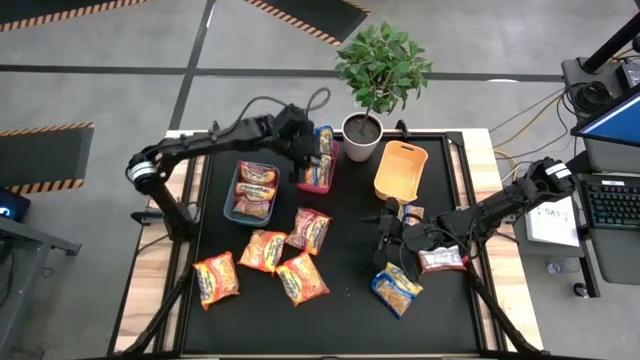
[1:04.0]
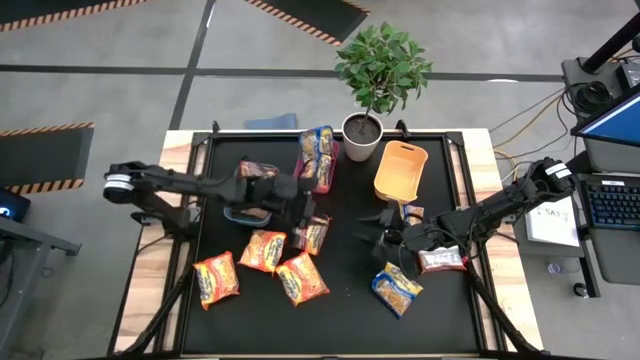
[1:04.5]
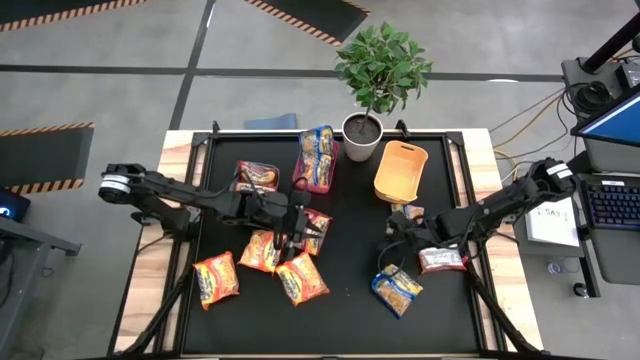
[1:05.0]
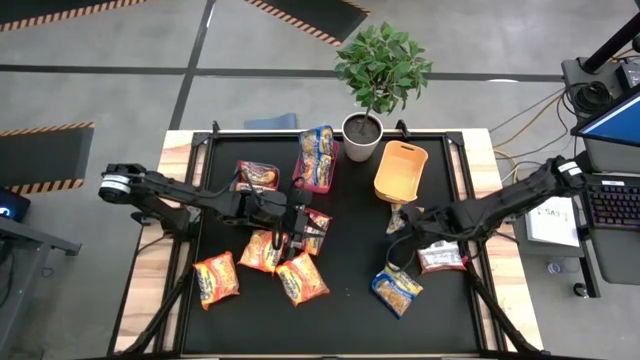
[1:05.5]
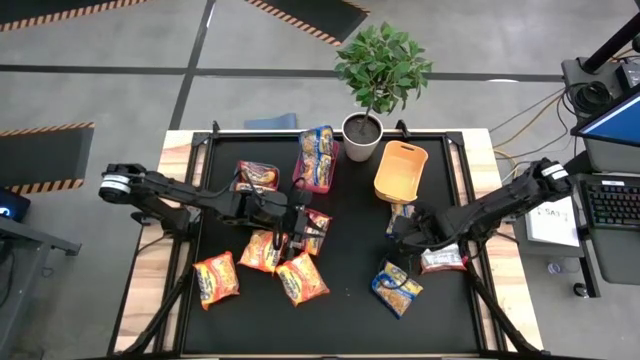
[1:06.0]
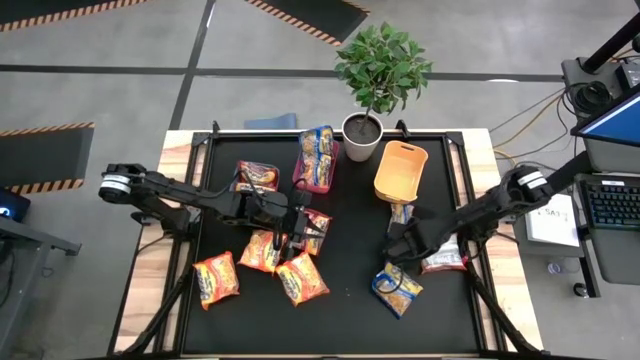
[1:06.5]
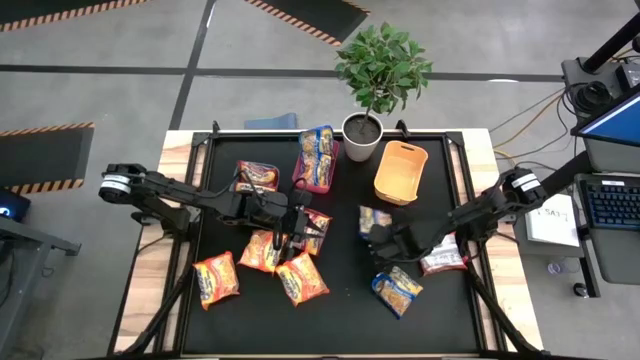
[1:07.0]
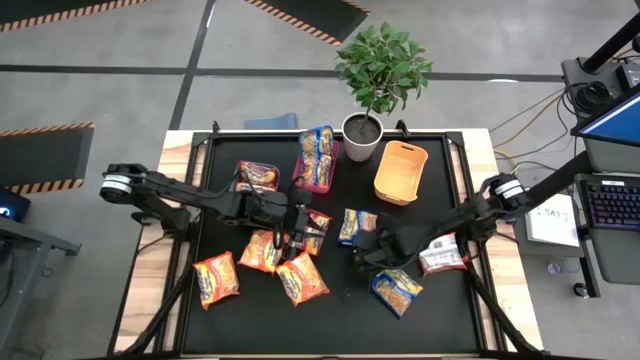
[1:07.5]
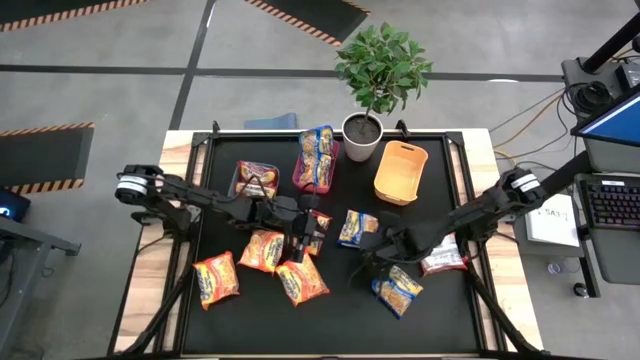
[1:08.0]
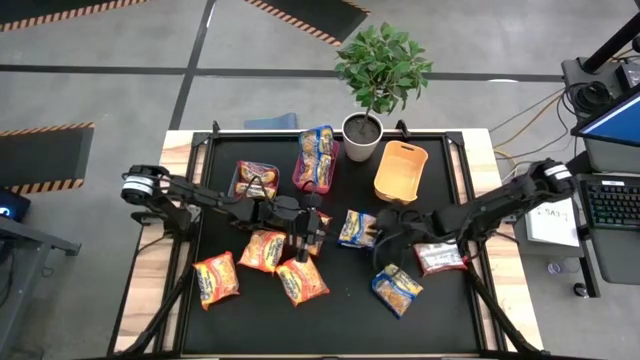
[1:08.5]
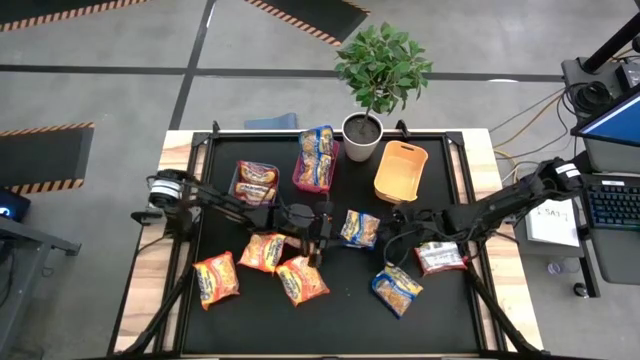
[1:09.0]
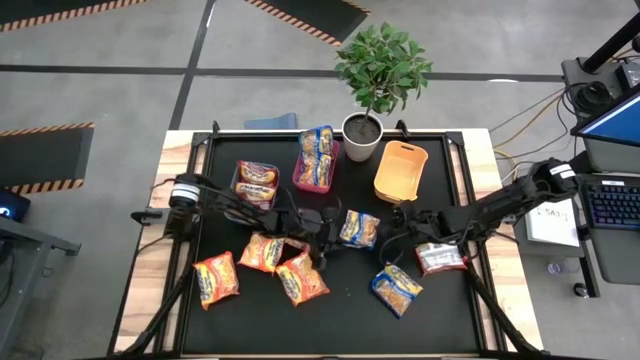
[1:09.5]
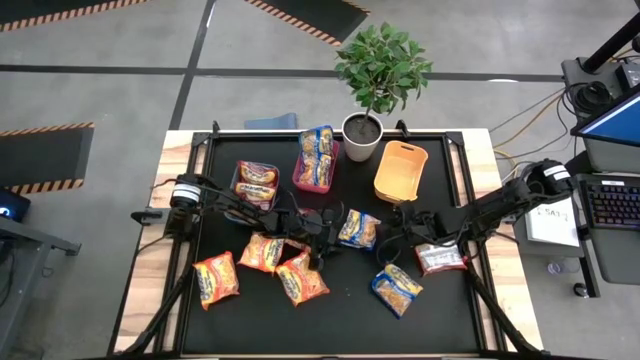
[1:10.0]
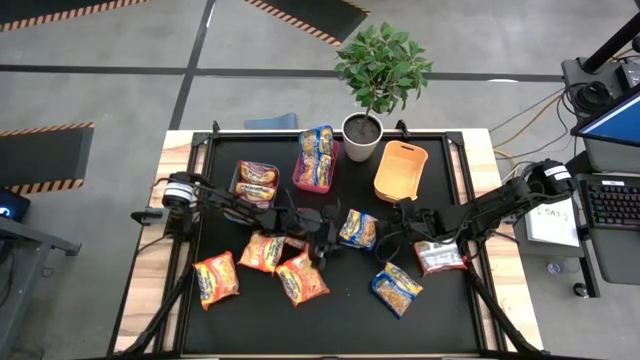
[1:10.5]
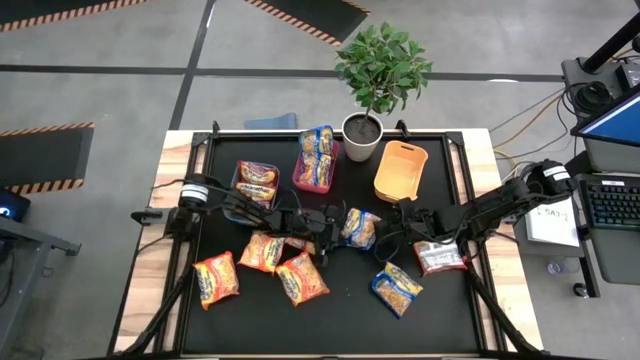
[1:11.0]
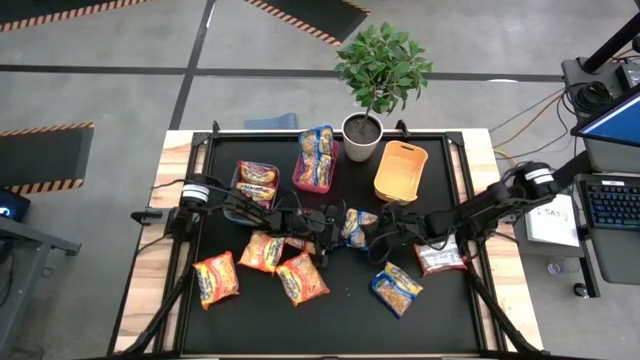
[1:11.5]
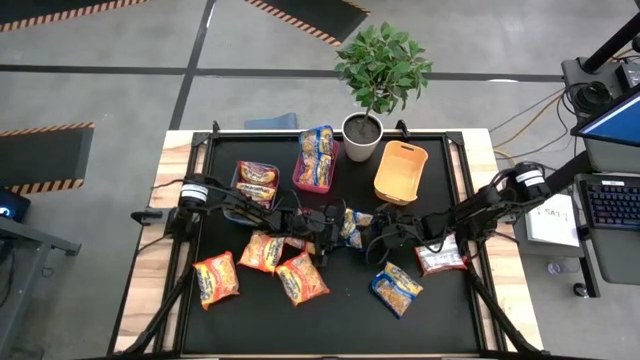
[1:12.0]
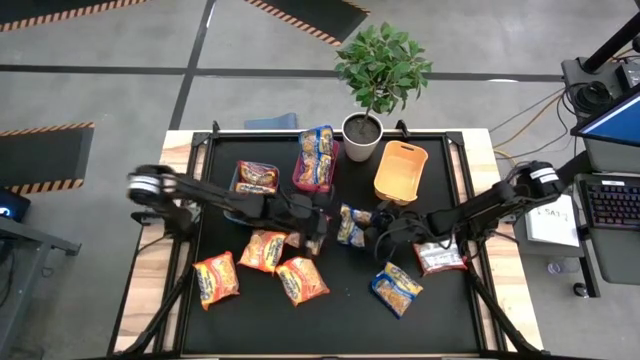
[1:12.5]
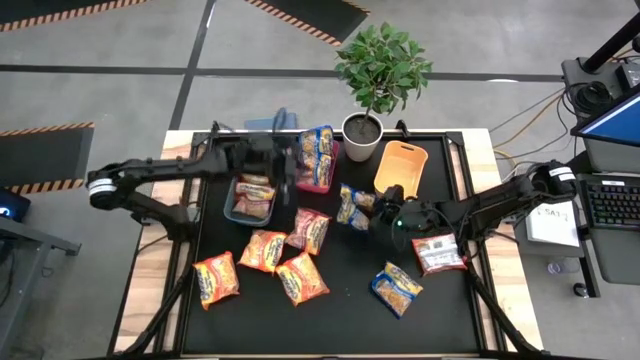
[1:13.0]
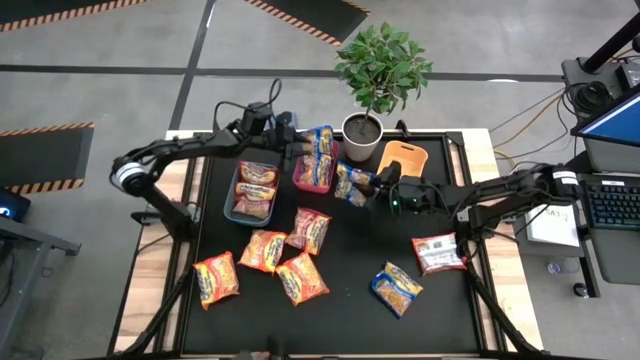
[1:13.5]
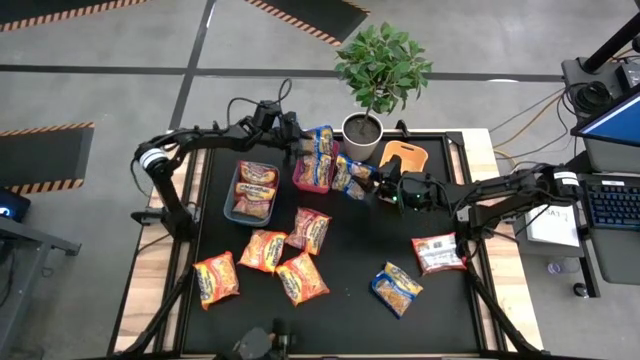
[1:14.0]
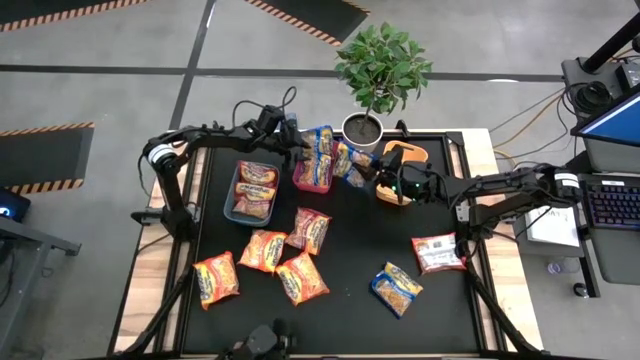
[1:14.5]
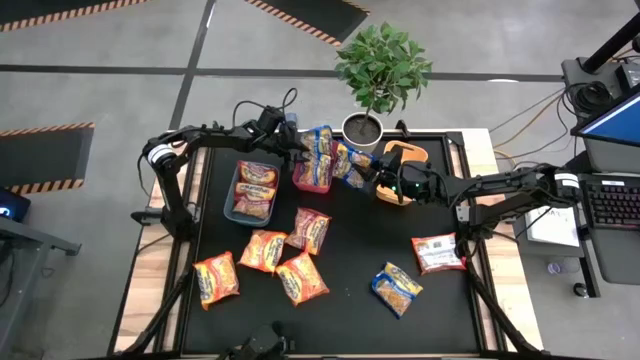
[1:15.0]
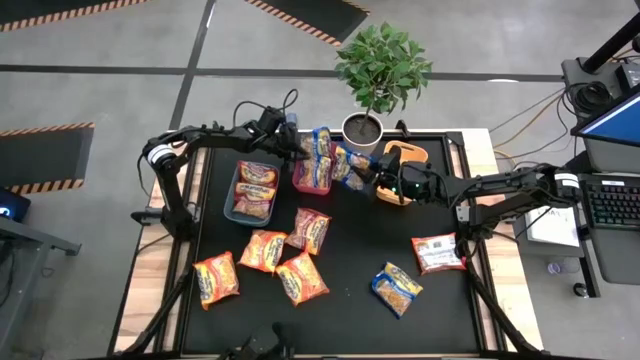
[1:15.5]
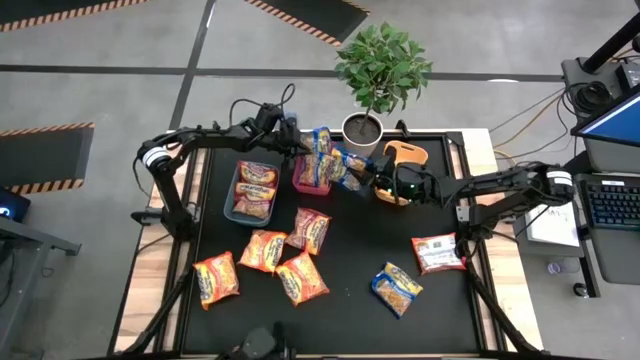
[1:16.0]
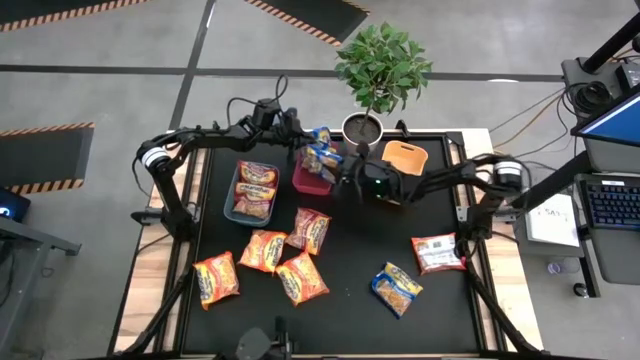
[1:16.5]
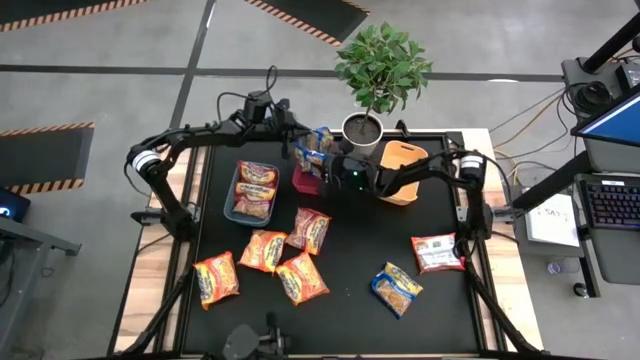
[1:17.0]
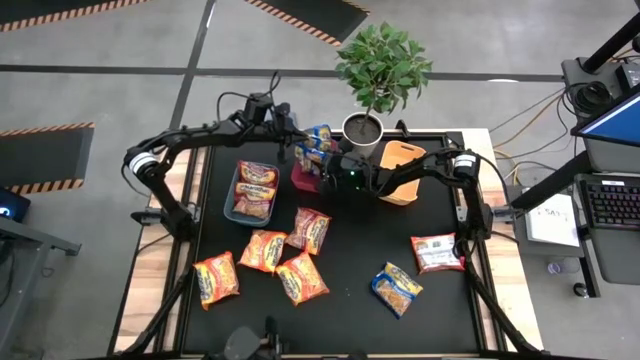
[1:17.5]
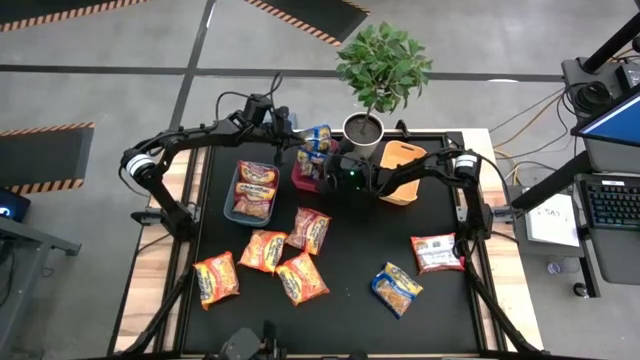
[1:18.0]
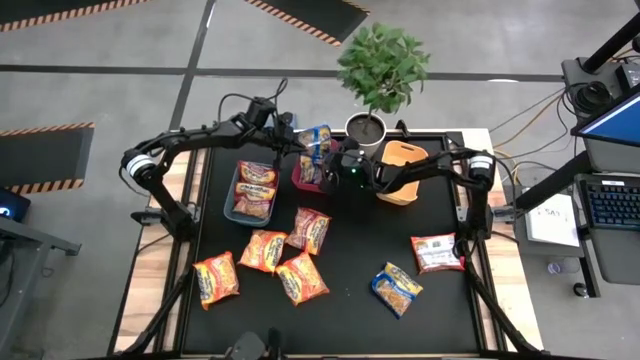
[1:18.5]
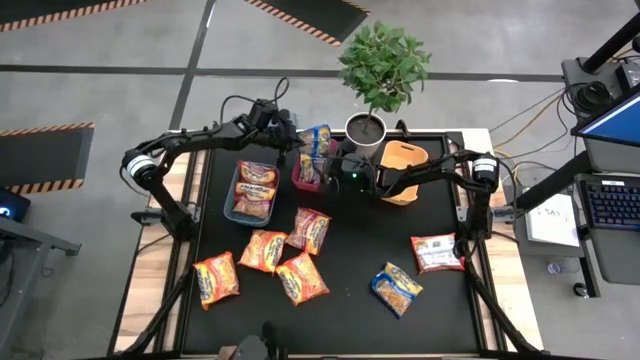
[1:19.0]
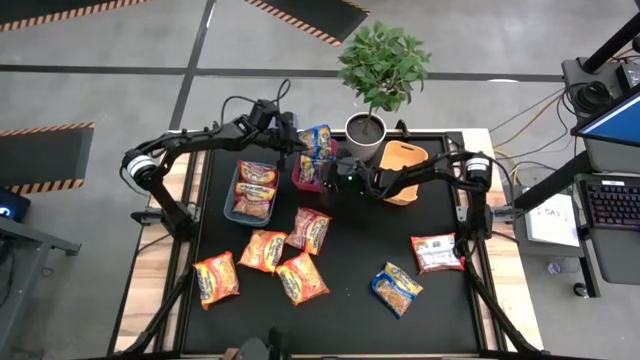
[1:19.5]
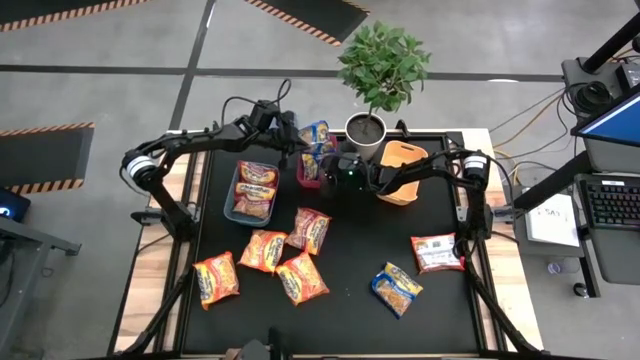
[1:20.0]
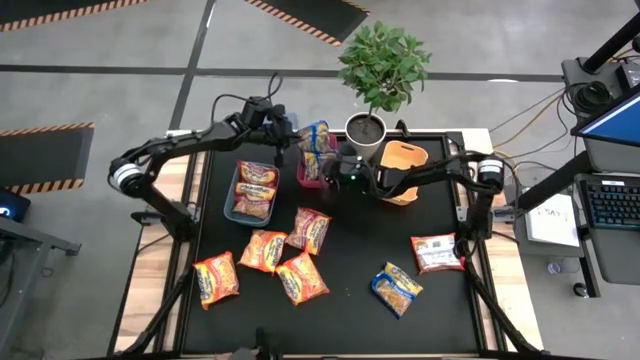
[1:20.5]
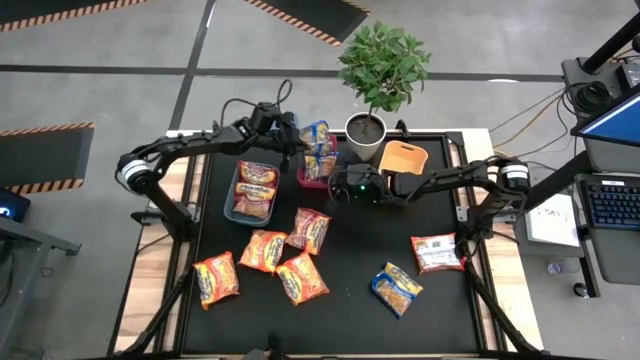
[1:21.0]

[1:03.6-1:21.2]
Task: Sort Maruchan noodles
Put the top blue noodle pack into the red bin

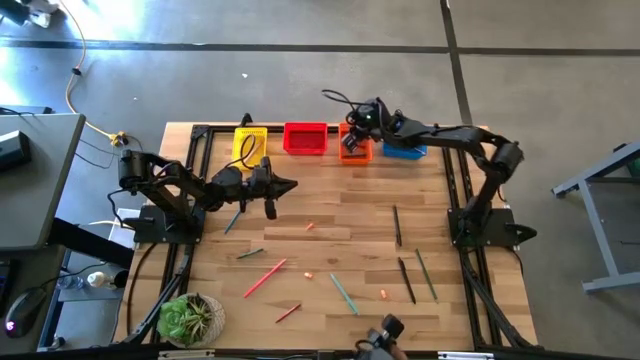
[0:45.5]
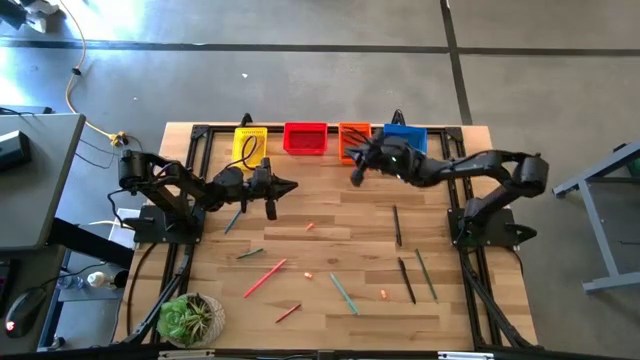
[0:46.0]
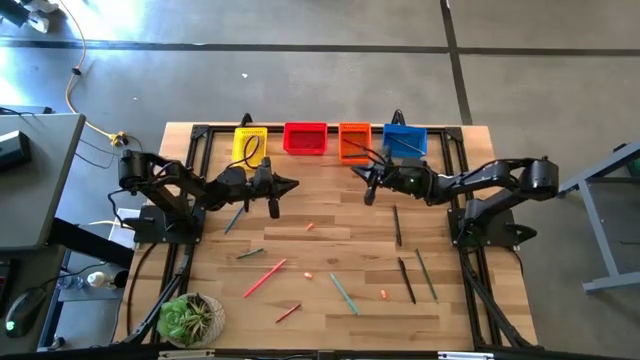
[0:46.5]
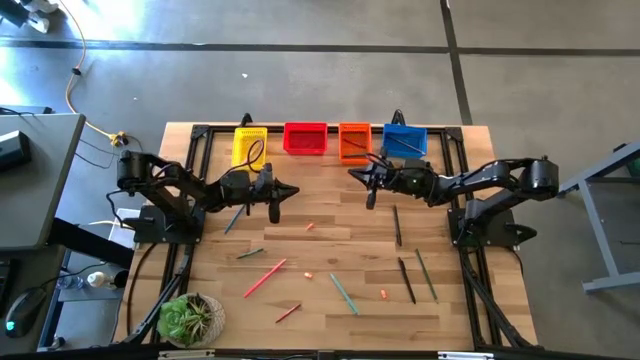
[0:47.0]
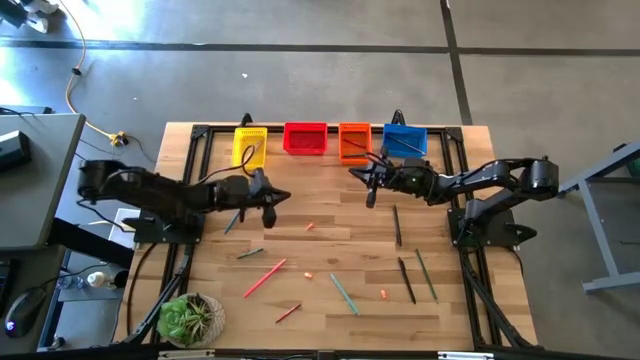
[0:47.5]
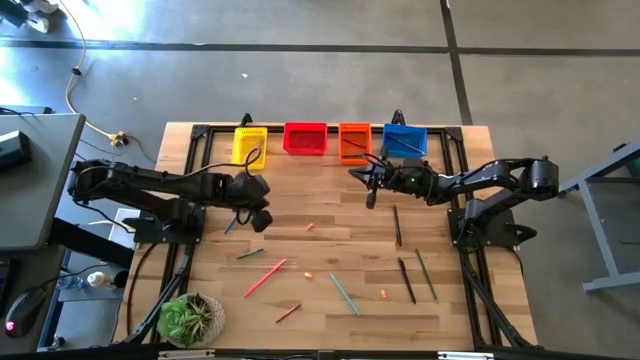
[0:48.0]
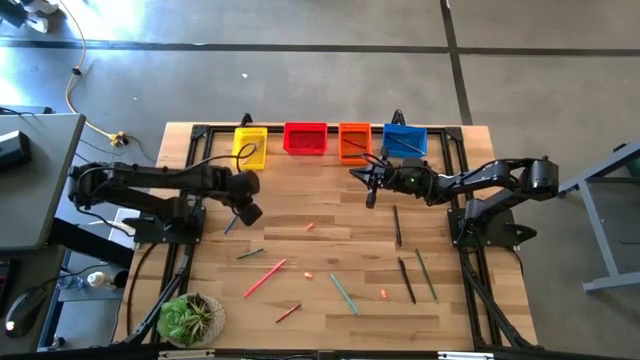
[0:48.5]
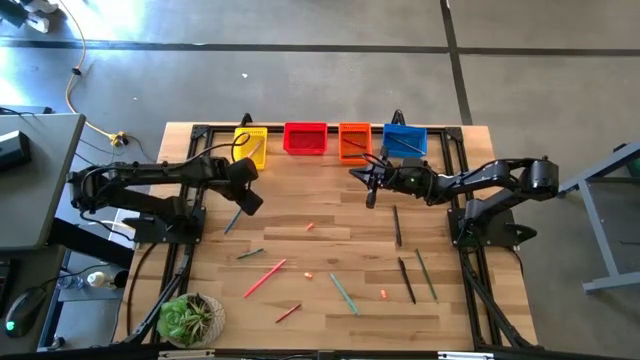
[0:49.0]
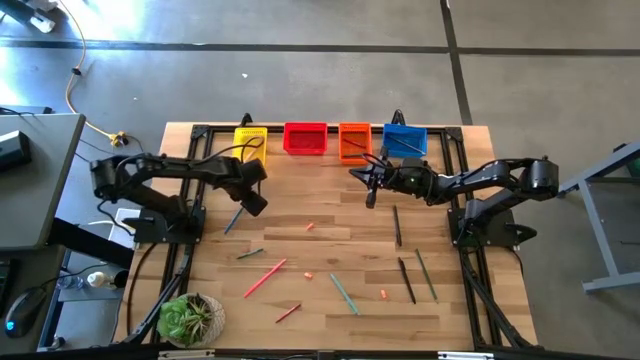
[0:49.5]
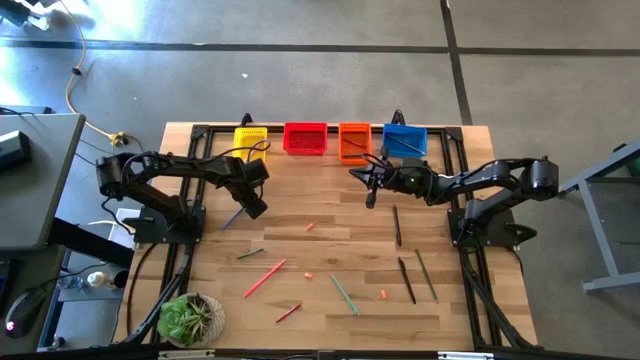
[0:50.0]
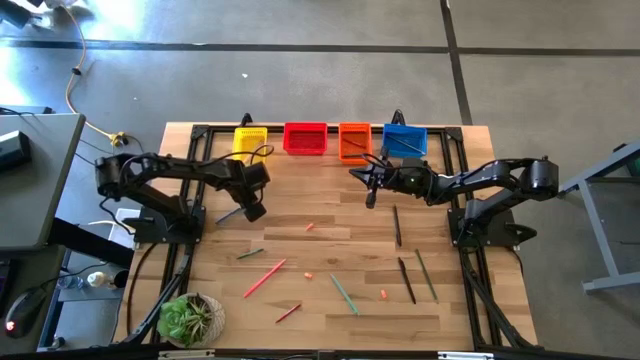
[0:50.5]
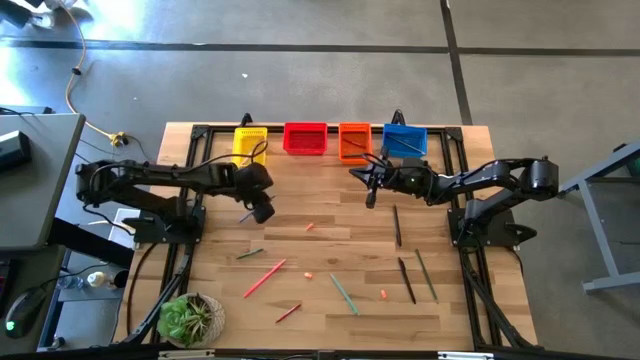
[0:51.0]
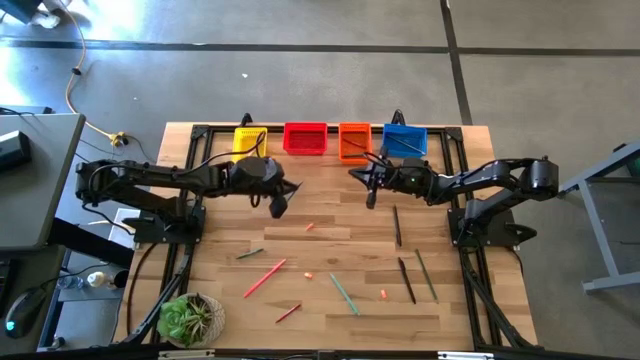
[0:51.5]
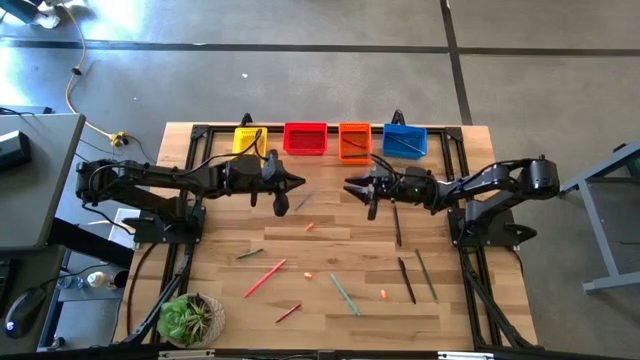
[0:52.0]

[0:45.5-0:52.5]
Task: Sort crayons/erasers/pens/pencils in bins
Put the blue pencil into the blue basket
